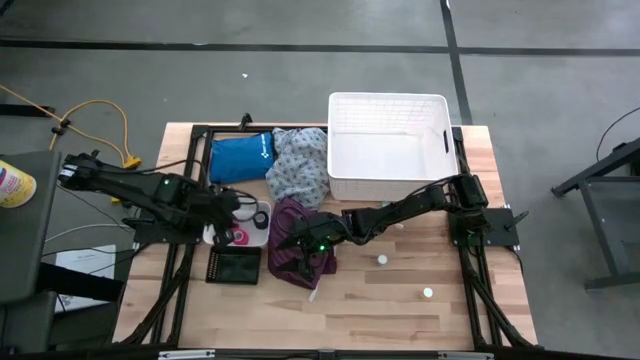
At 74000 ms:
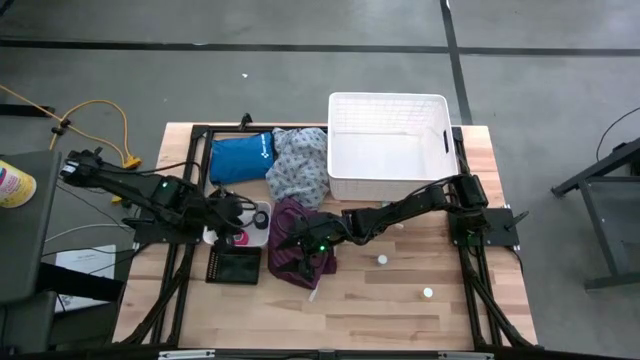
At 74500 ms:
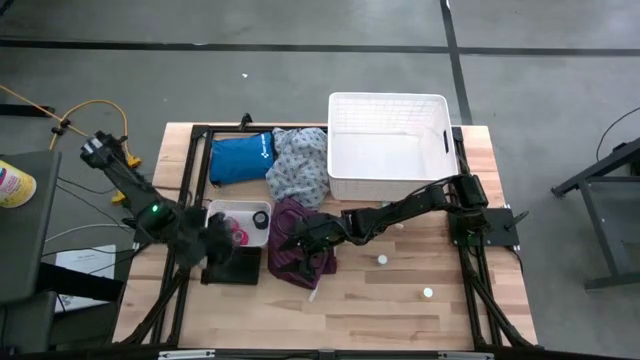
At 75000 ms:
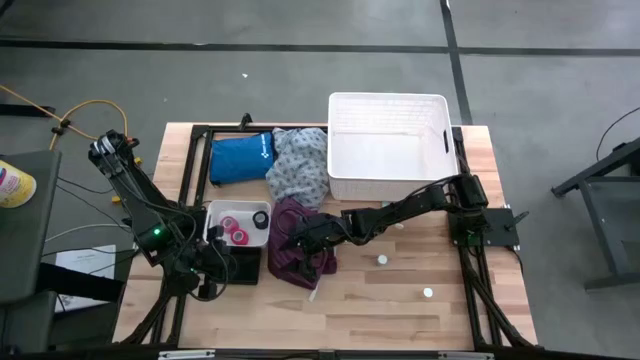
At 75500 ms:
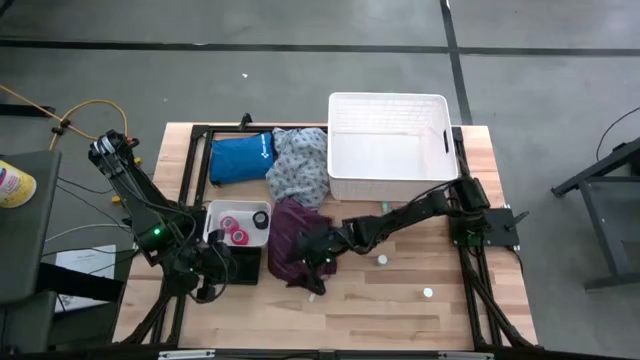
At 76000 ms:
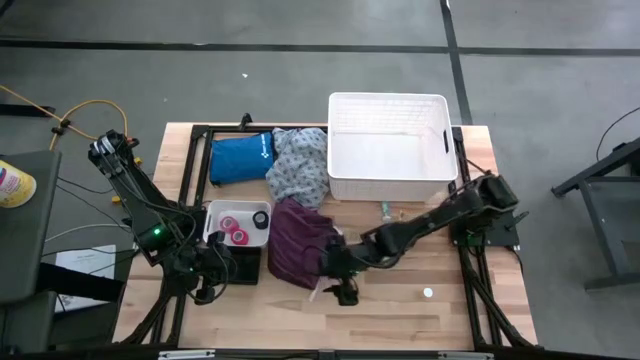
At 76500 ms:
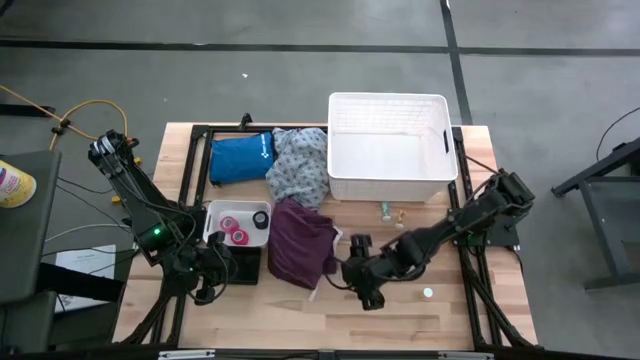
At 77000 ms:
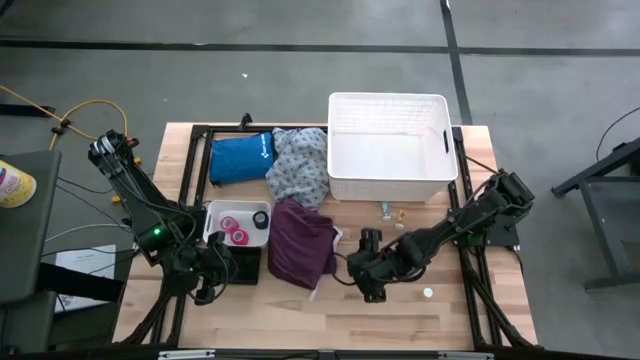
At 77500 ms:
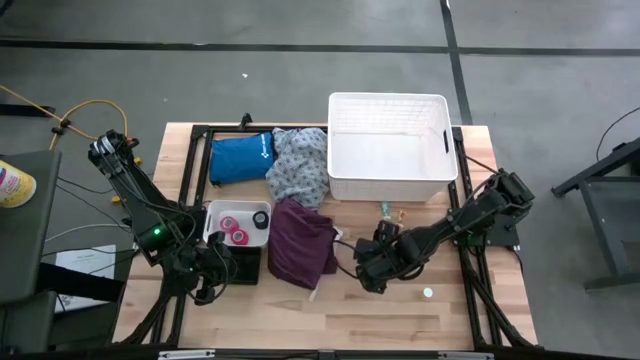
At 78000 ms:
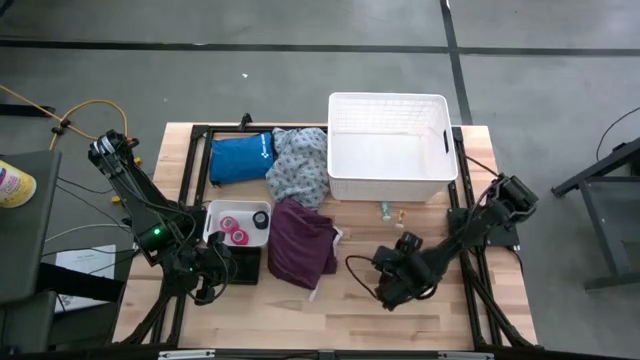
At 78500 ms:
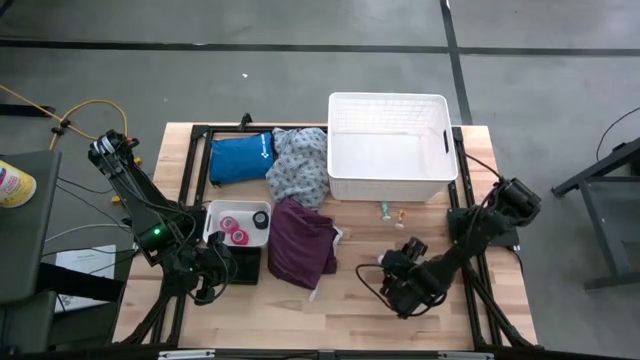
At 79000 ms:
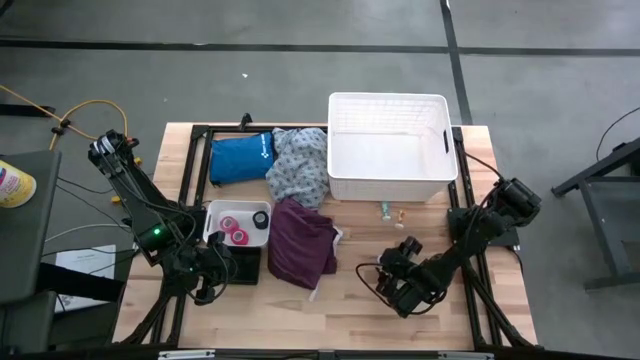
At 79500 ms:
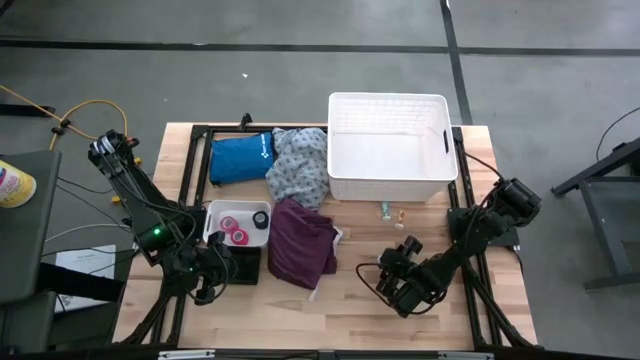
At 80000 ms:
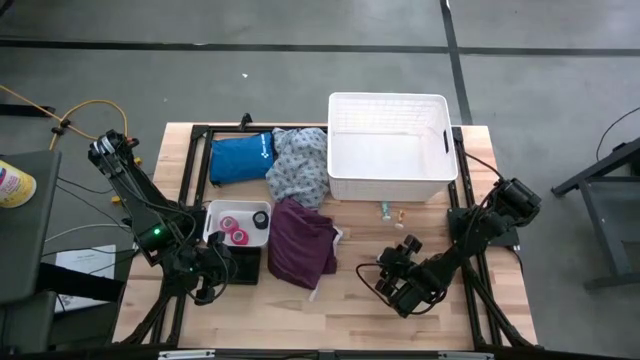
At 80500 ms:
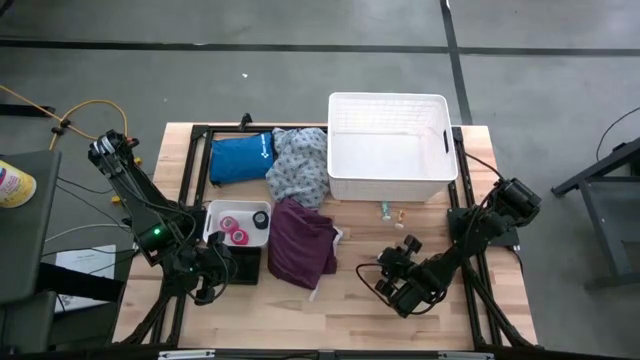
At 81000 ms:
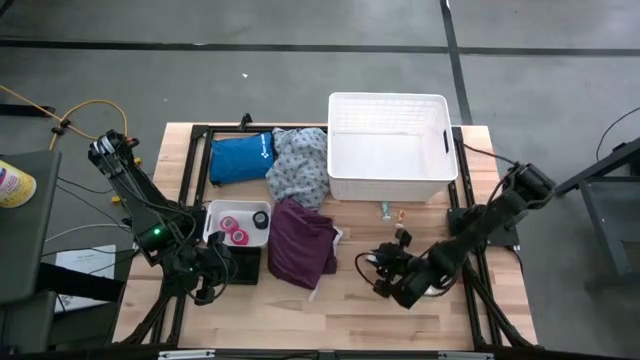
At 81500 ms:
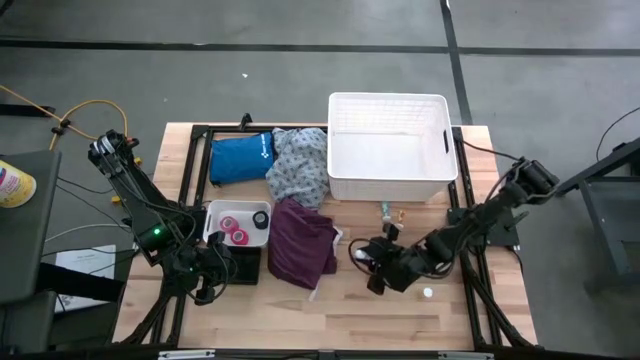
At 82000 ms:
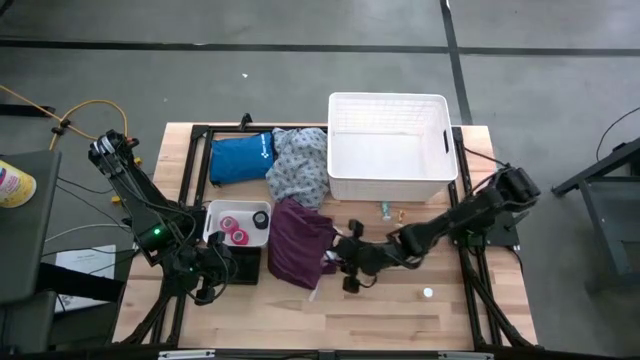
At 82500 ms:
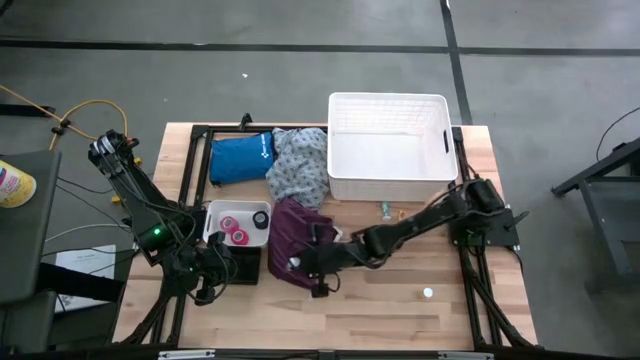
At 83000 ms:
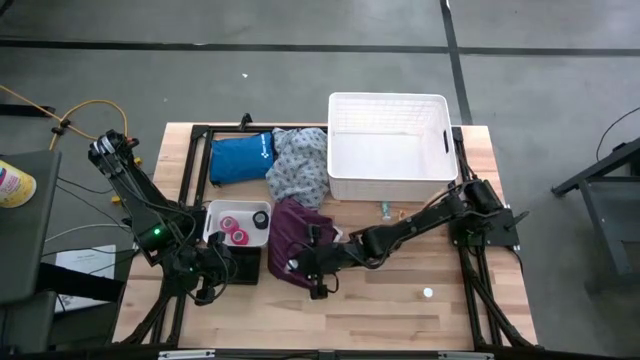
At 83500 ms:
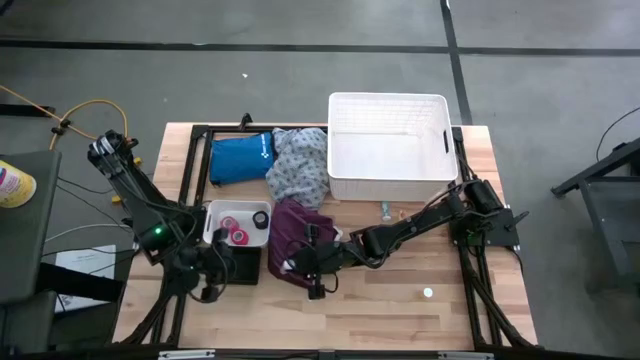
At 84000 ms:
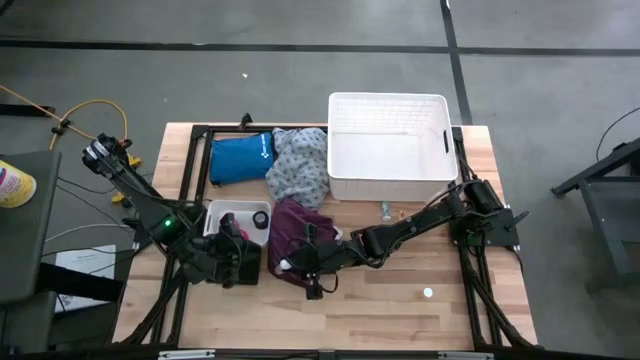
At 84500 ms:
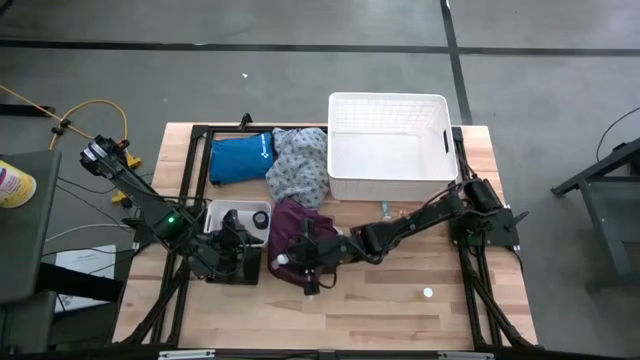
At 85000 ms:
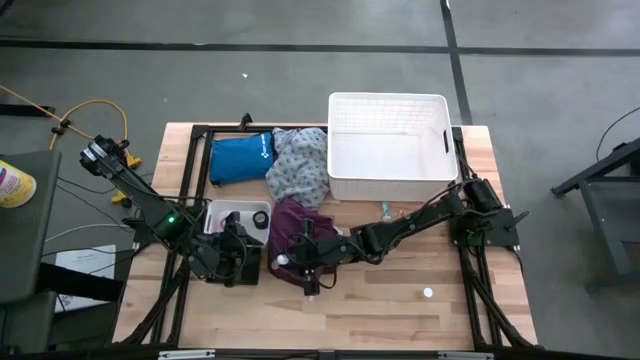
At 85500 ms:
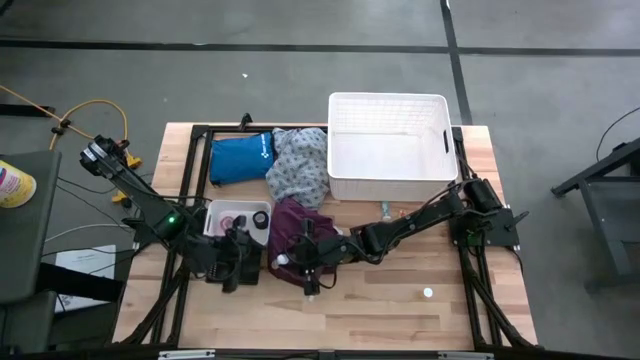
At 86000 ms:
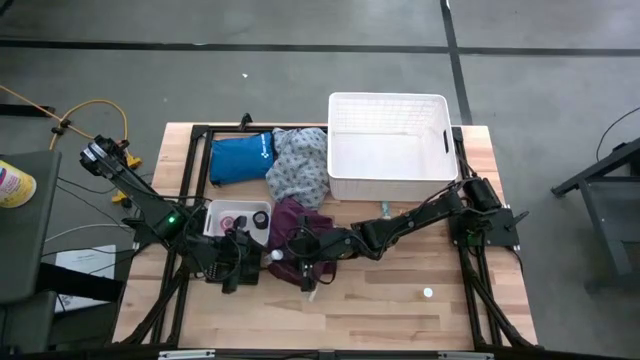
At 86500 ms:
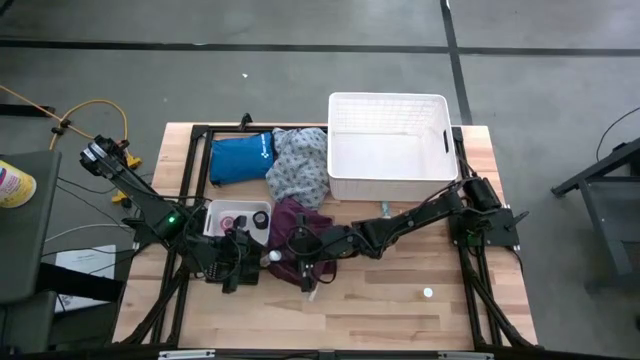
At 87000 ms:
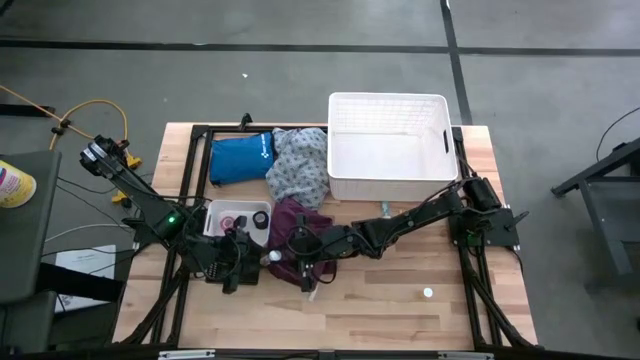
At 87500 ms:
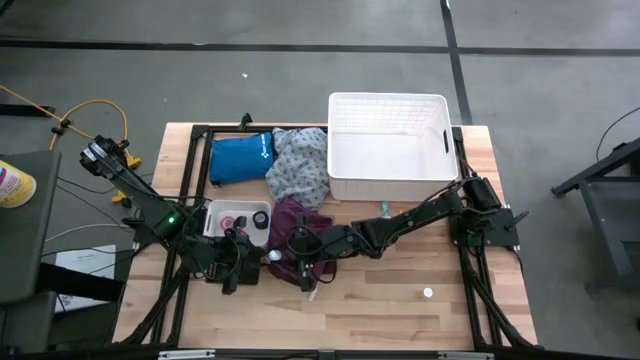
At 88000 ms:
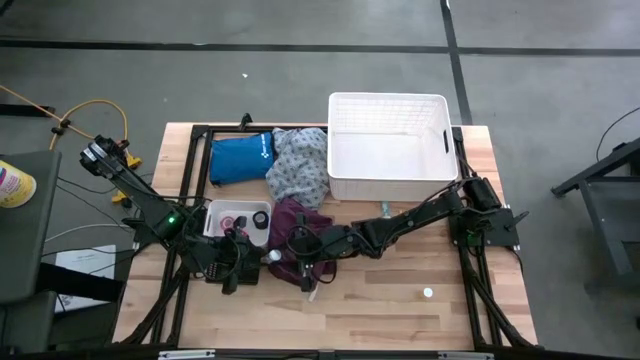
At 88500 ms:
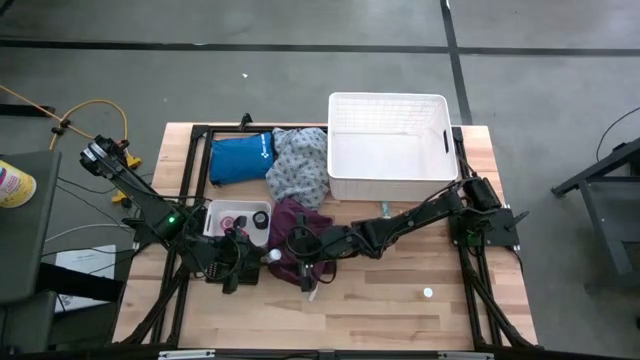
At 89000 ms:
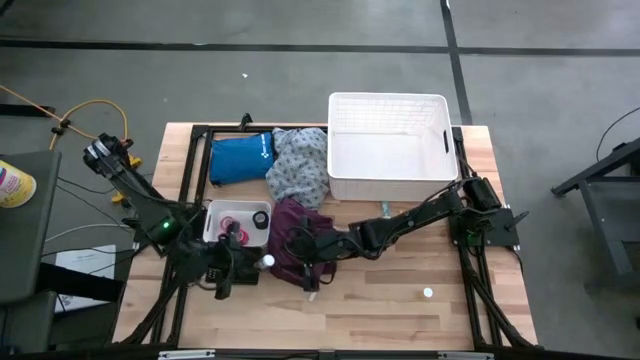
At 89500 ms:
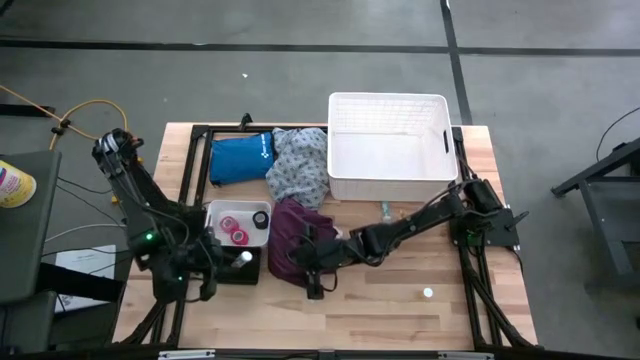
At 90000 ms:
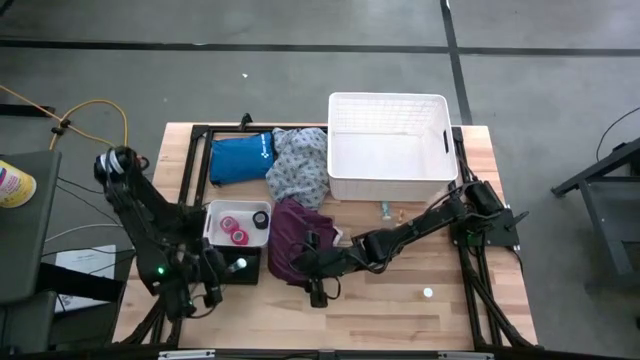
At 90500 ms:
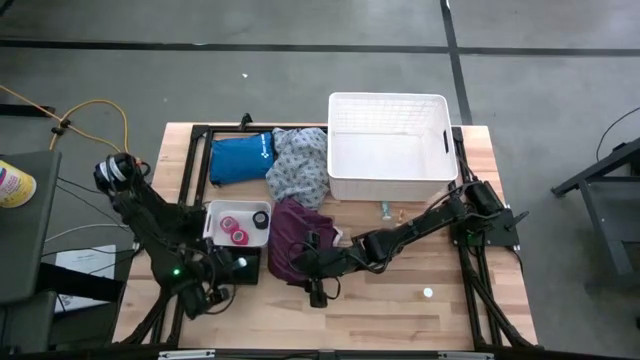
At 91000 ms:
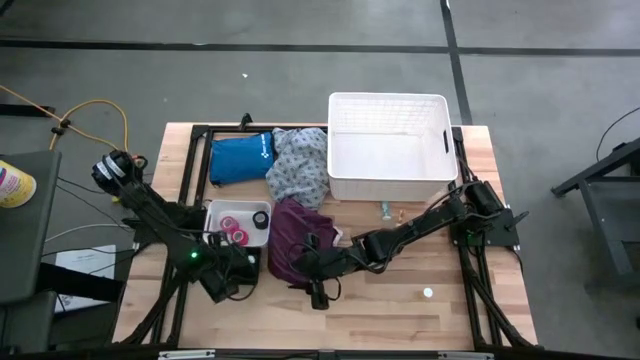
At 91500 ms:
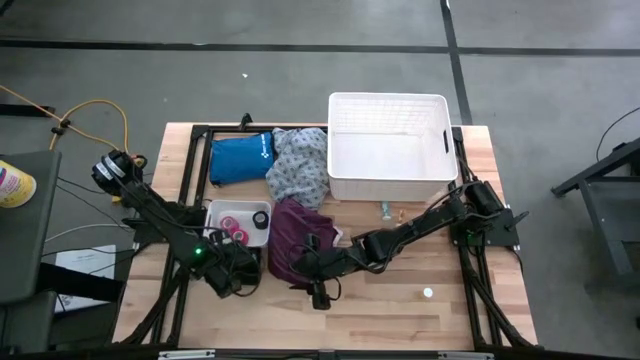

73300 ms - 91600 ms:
Task: Pick & place medical supplies in basket/bin
Put the bottom blue pill bottle into the black bin

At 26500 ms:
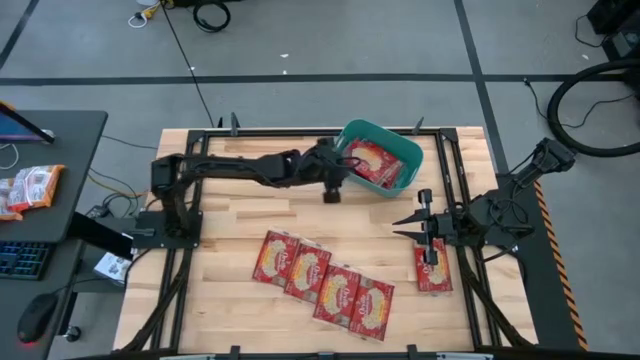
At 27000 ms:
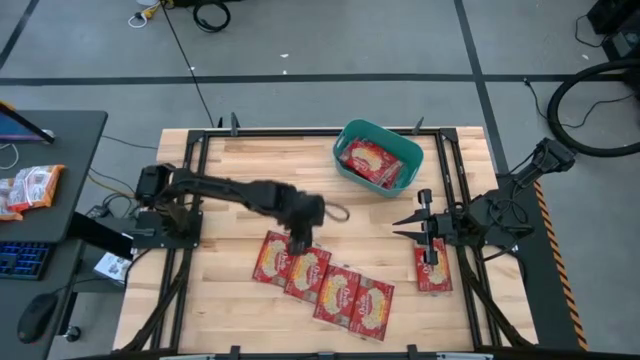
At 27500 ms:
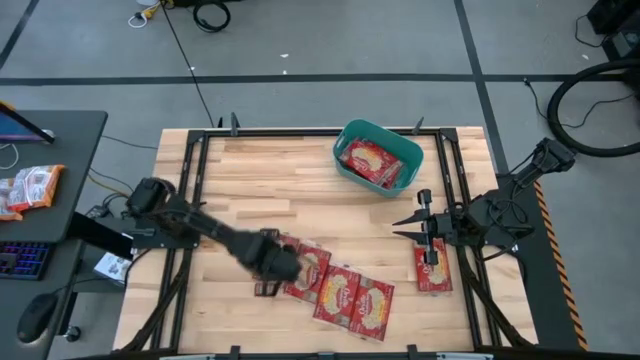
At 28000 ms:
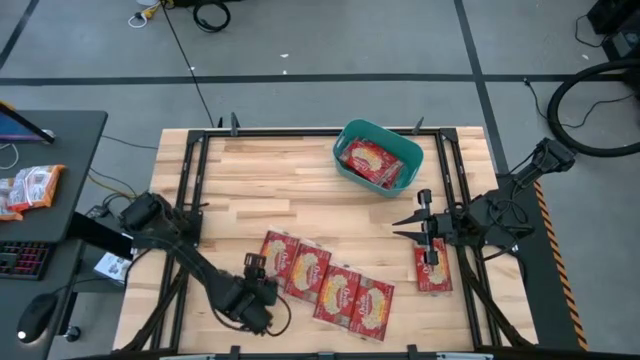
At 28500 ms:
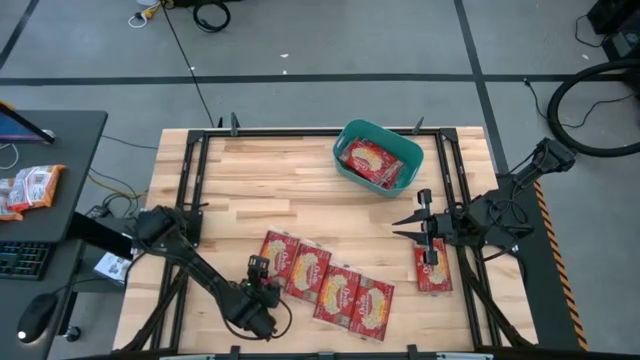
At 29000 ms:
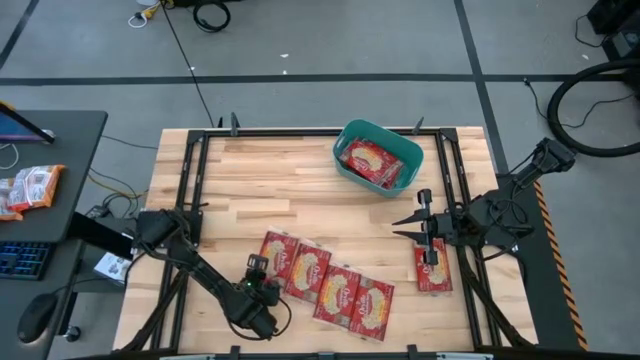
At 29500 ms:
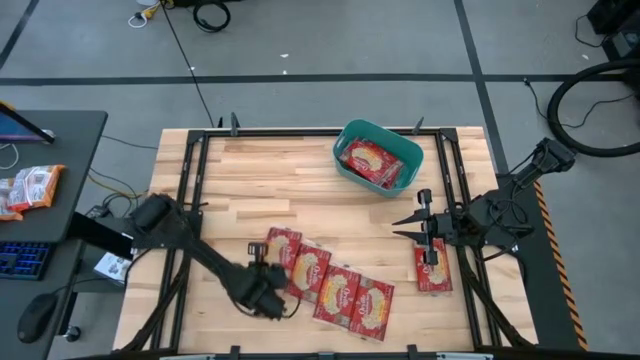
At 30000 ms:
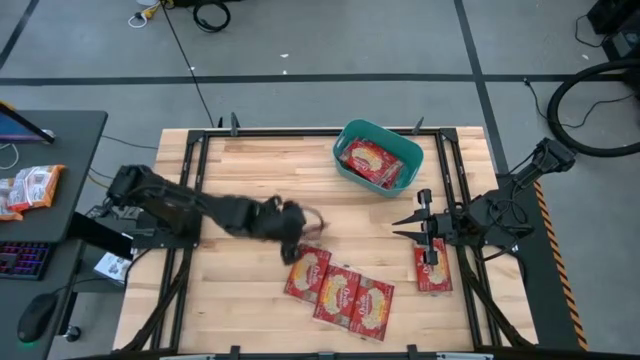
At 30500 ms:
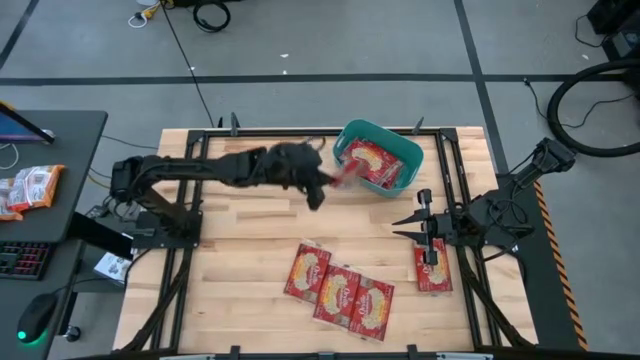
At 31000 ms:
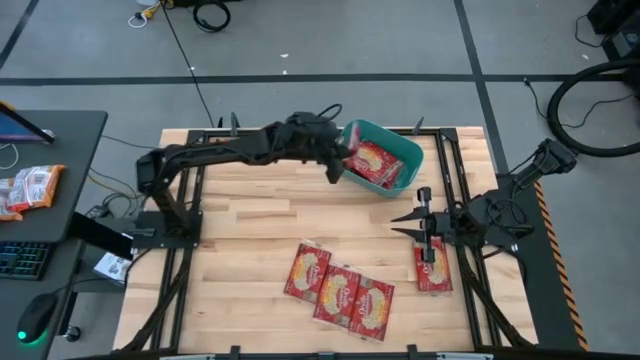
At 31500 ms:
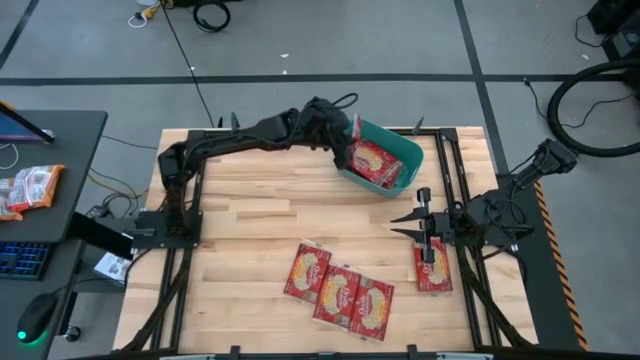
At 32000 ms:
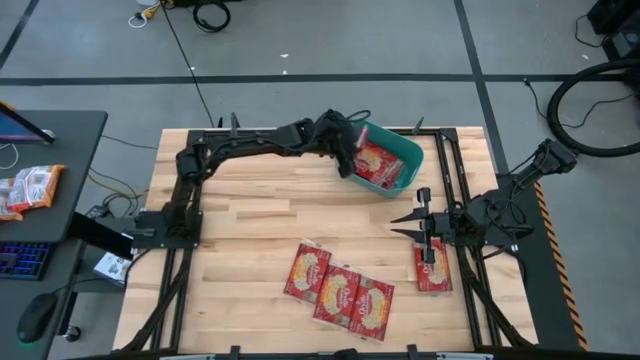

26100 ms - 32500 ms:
Task: Sort popcorn bags into baskets
Put the popcorn bag into the bin
